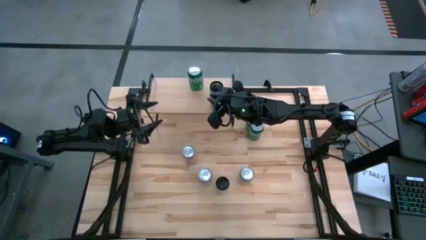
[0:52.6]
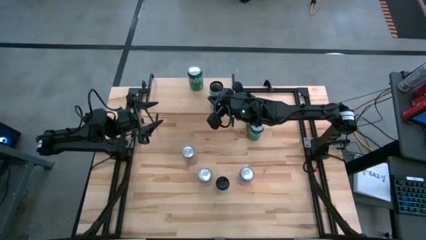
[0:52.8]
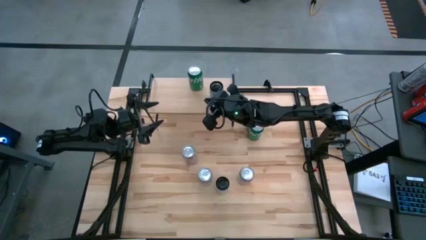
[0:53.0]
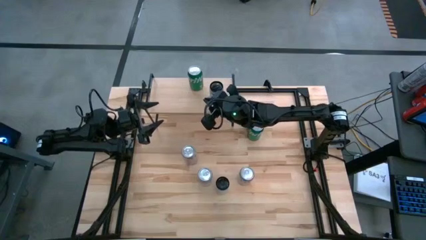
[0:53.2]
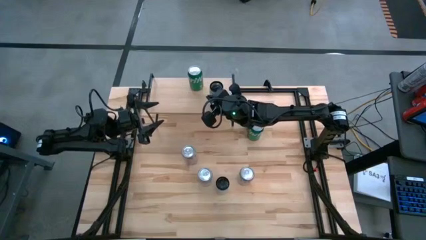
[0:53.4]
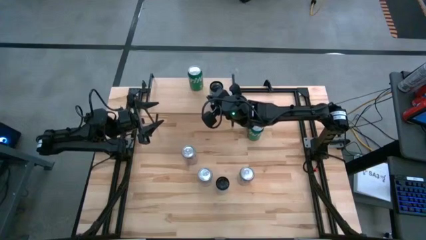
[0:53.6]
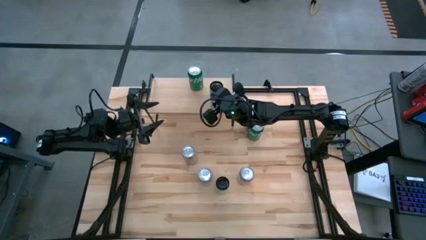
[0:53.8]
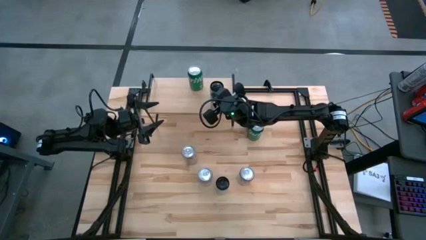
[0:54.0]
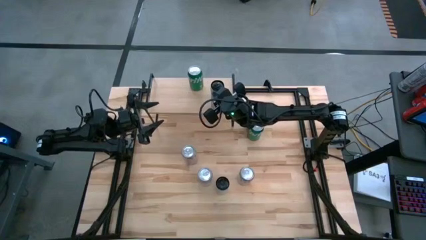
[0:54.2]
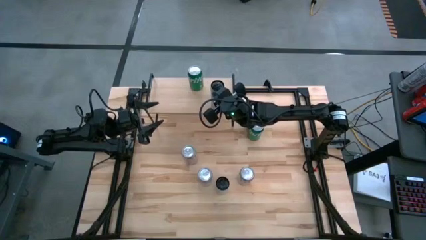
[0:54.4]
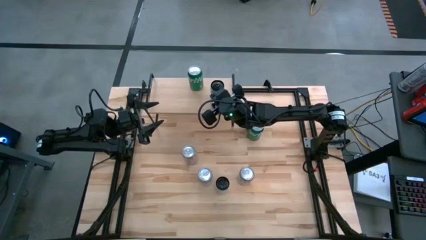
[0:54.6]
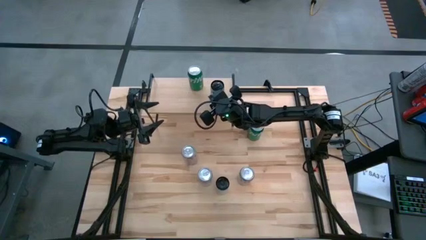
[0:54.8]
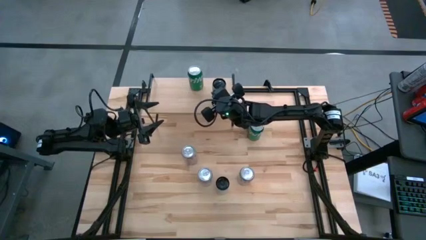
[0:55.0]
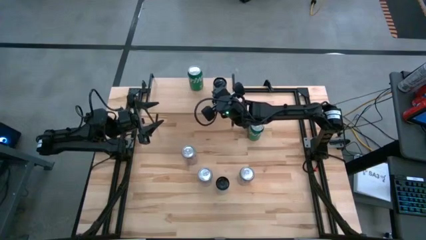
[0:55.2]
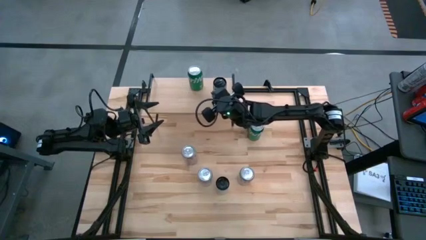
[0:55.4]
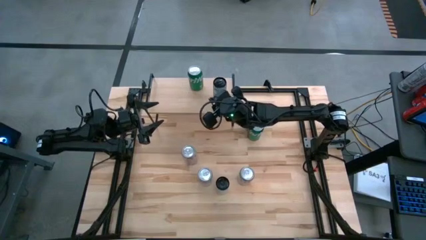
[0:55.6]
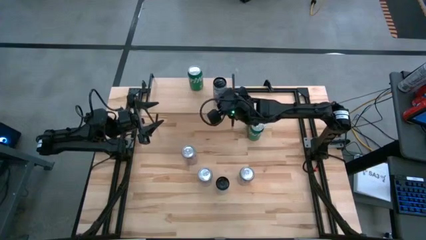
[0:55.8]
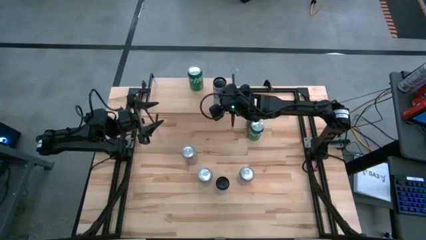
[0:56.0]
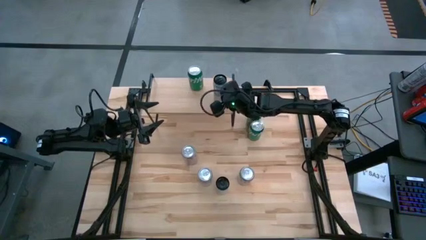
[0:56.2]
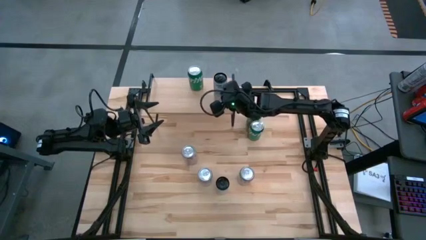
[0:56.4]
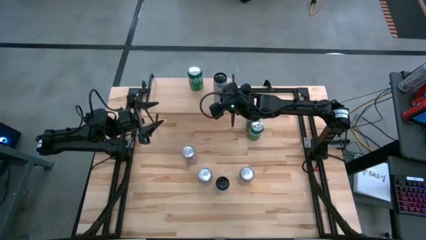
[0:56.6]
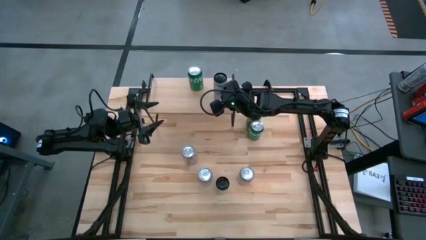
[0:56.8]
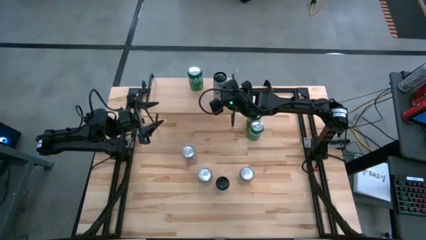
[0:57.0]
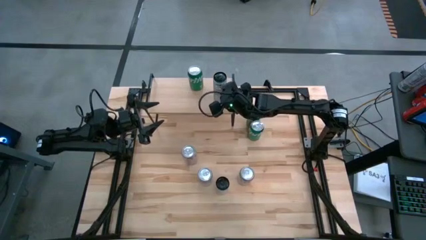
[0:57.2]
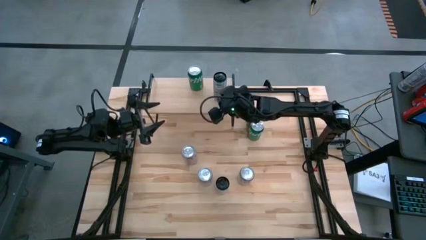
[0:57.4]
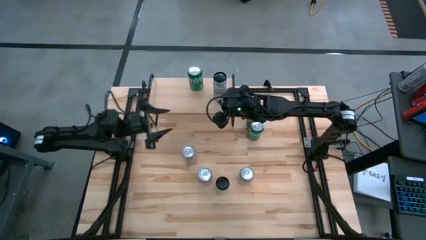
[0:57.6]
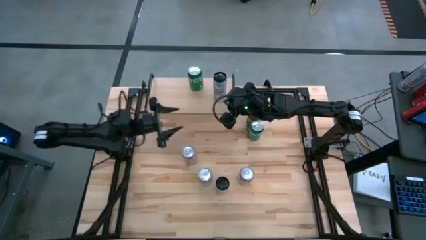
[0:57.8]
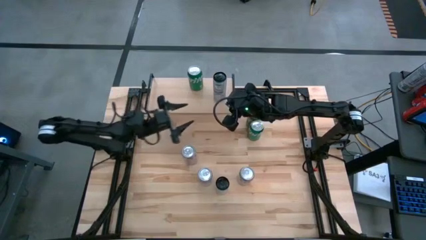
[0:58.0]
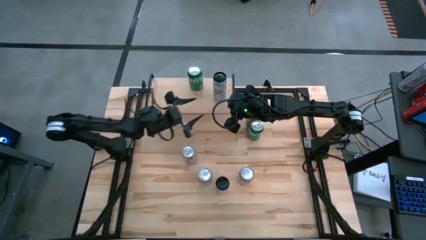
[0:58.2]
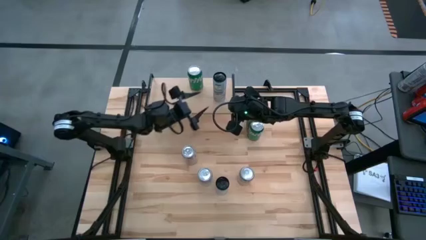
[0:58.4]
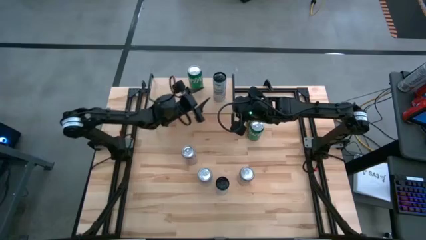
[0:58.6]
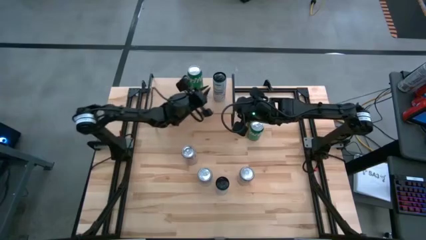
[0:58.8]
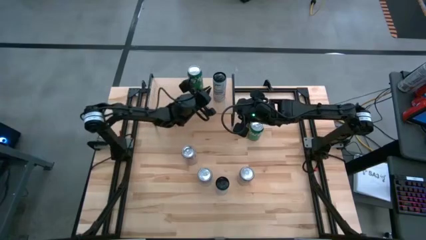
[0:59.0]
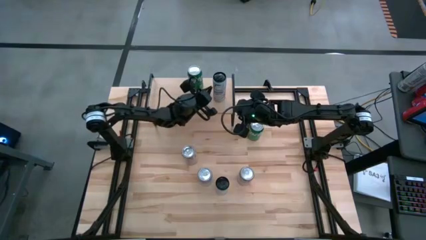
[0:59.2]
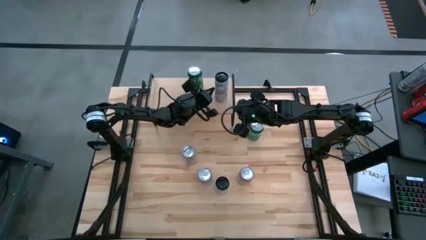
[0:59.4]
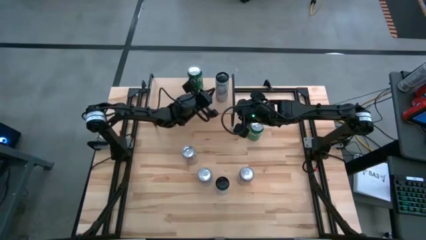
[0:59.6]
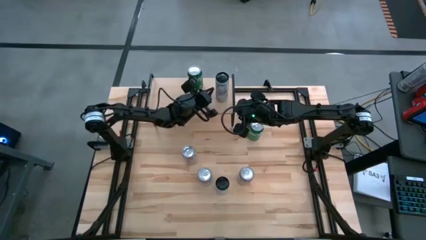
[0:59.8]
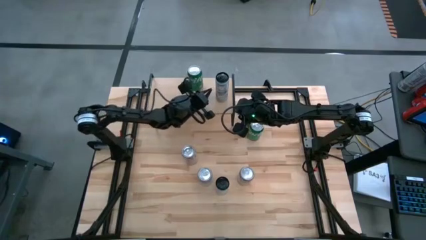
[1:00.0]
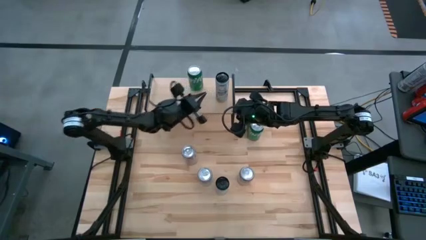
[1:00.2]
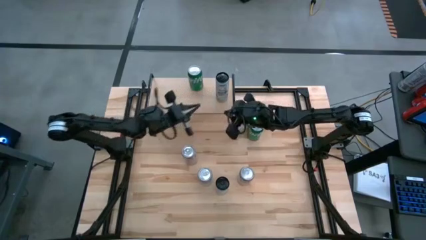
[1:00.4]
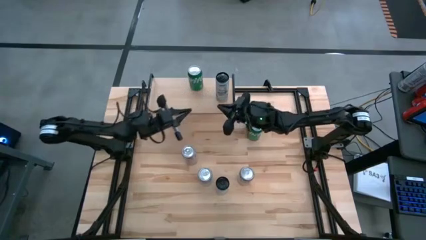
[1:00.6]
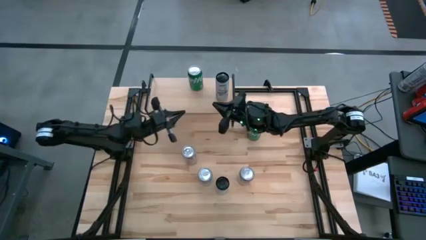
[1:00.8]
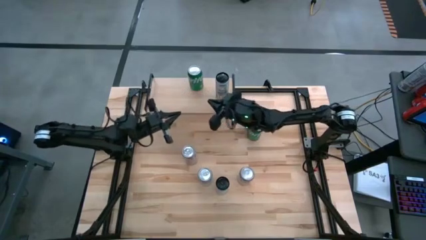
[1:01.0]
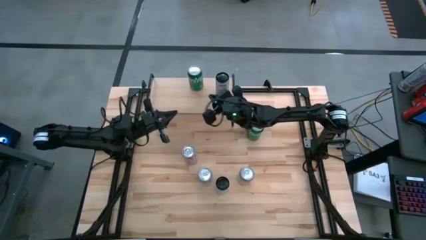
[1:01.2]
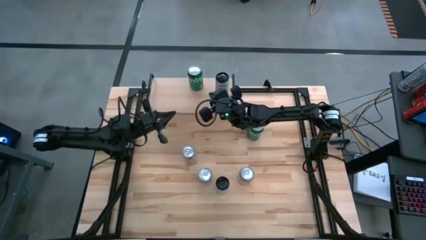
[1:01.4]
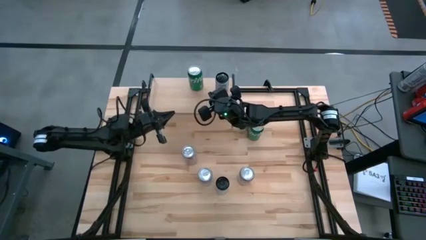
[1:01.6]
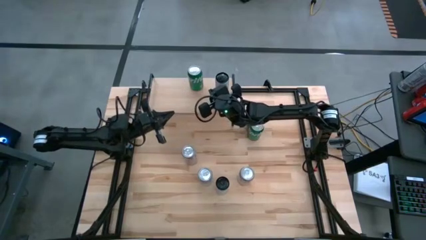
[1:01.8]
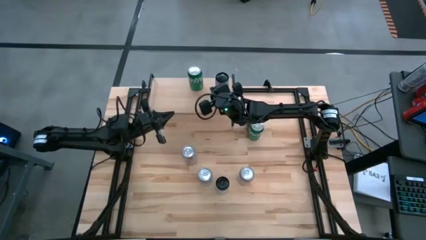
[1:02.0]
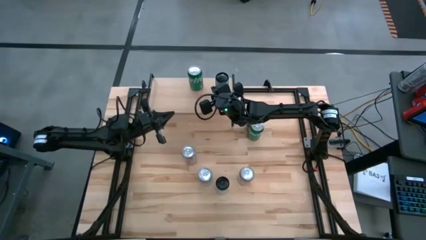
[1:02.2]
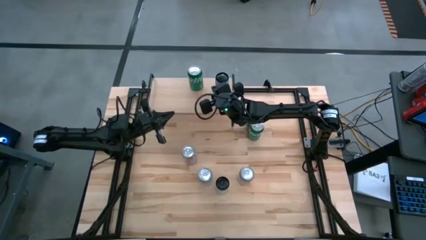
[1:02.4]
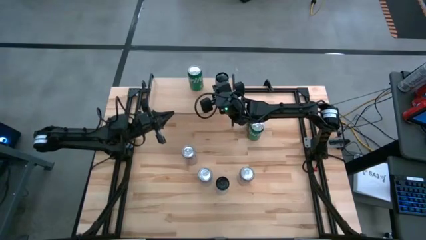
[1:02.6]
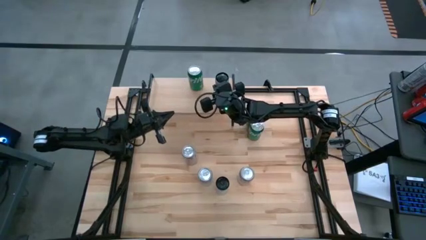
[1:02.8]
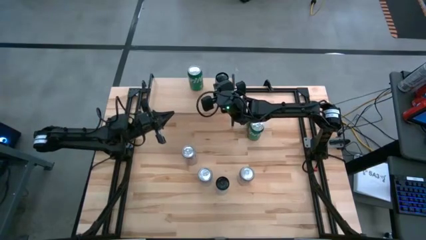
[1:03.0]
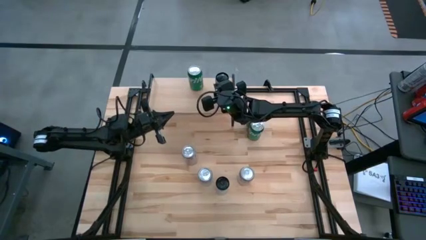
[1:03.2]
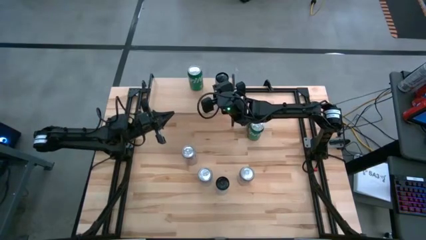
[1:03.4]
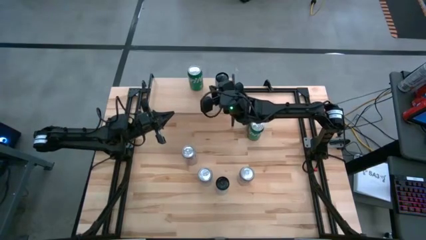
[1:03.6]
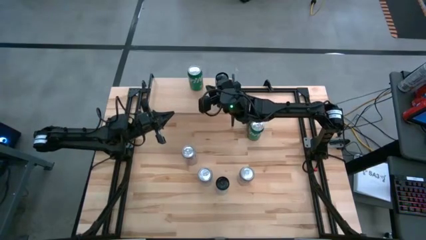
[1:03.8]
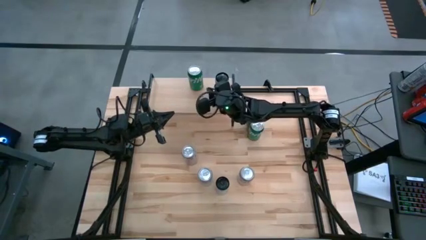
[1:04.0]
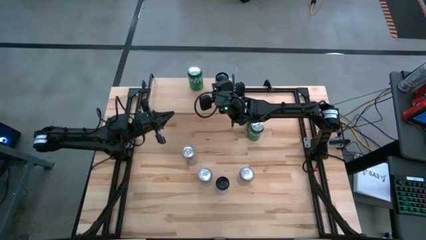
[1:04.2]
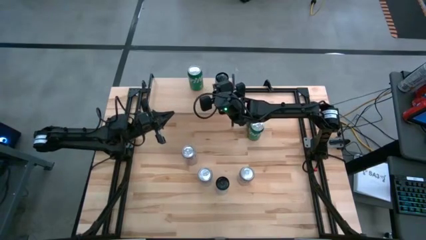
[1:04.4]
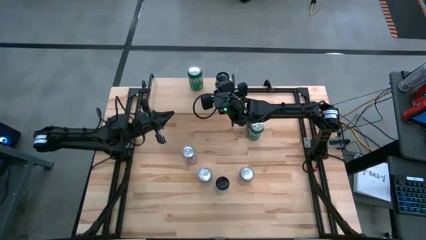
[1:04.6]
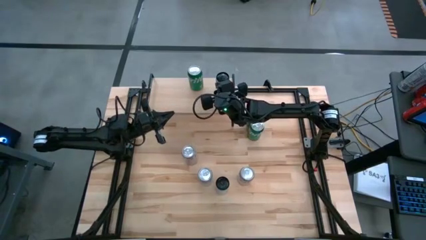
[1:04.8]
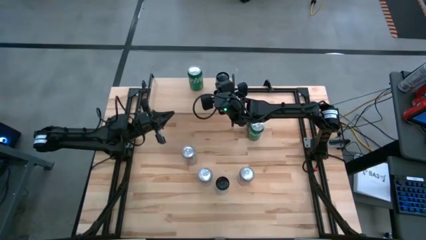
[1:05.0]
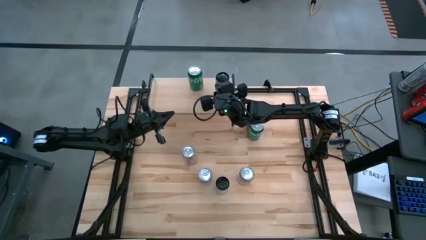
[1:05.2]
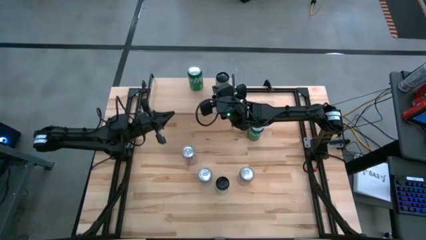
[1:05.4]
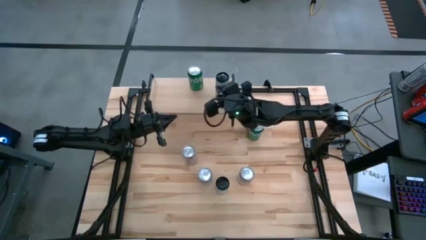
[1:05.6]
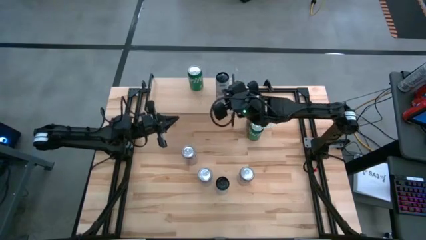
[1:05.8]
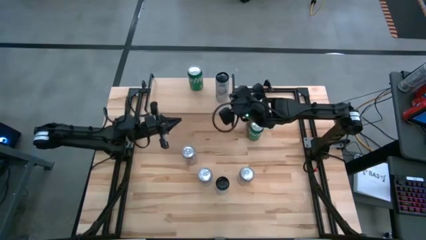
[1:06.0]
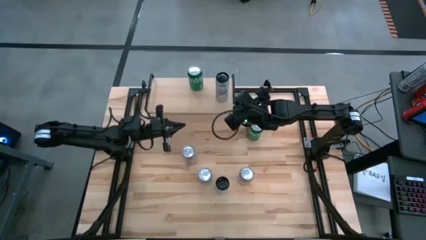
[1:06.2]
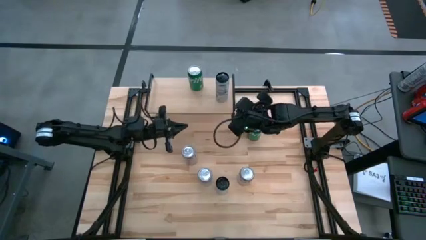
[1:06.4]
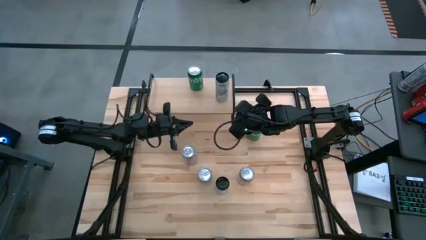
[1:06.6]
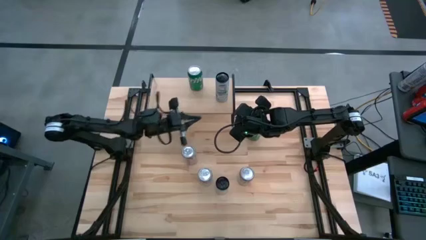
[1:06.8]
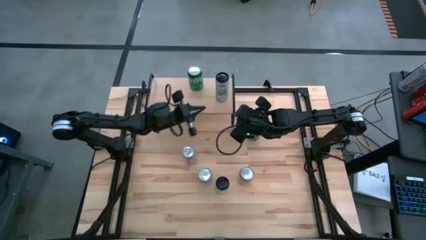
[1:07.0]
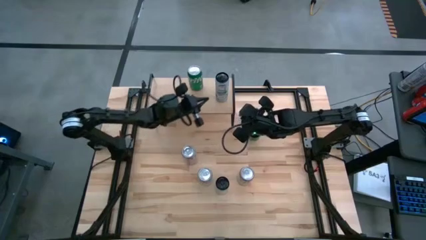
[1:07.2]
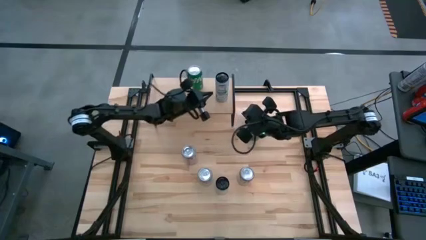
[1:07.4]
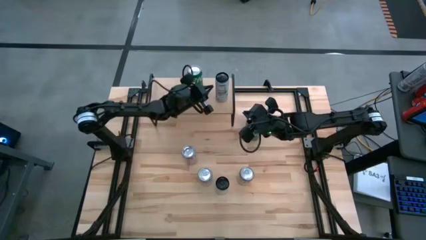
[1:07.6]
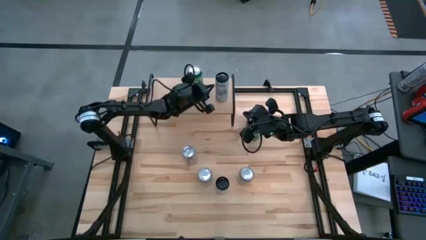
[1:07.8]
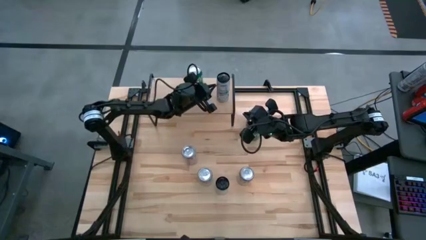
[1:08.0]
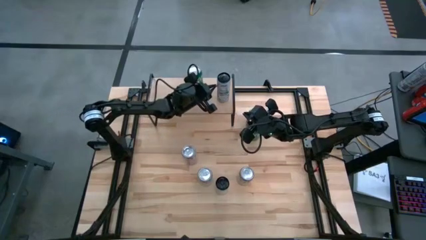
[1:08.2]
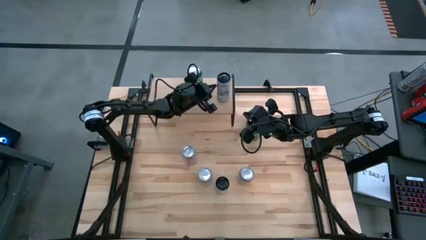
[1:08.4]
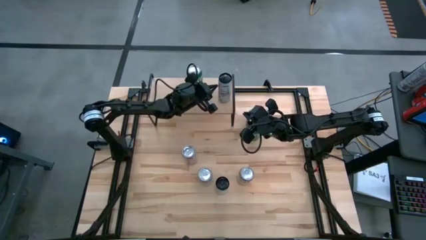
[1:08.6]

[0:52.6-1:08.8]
Task: Place canned beverage on shelf
Put the top white-blue soda can on the shelf
